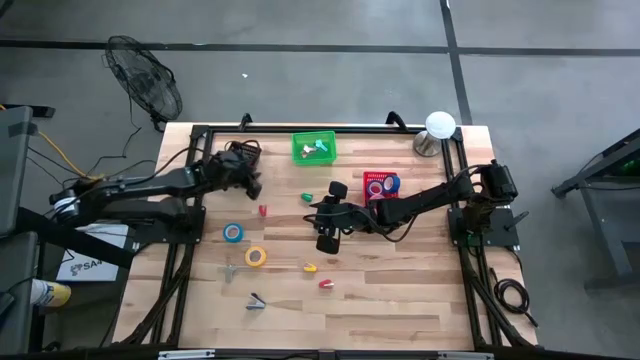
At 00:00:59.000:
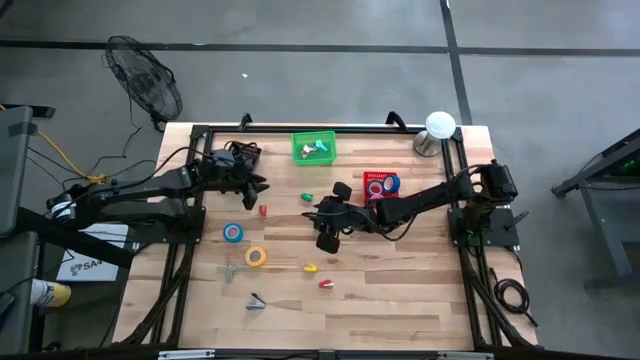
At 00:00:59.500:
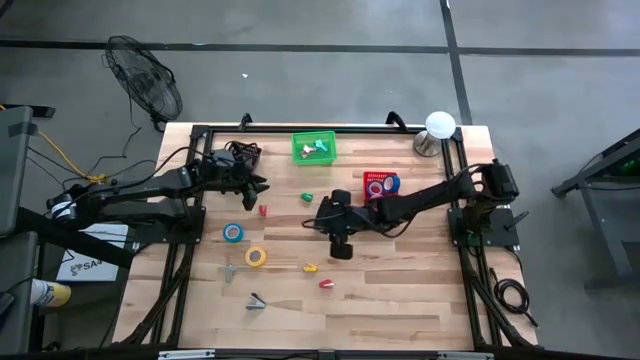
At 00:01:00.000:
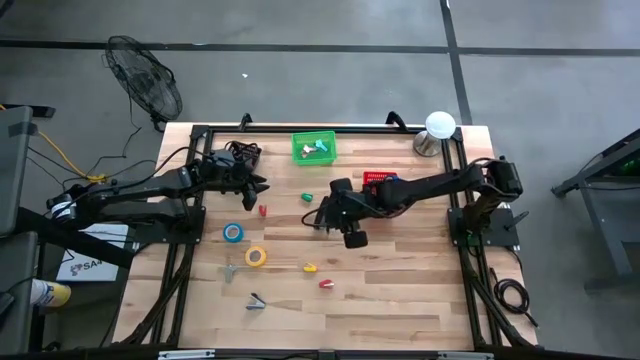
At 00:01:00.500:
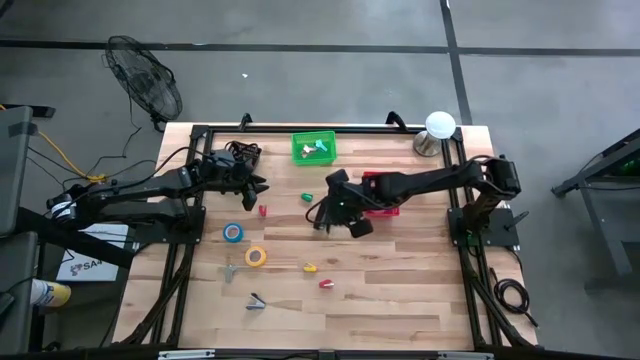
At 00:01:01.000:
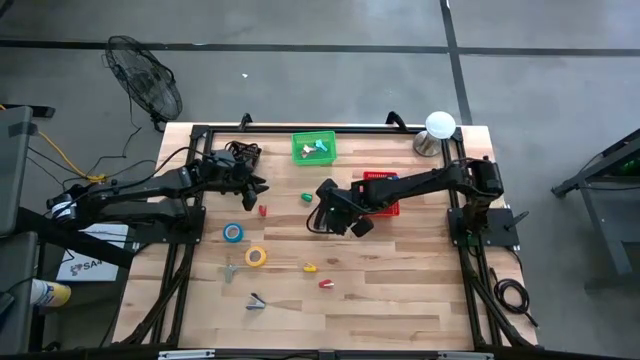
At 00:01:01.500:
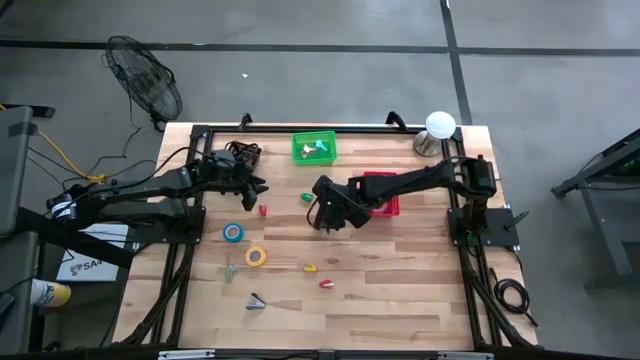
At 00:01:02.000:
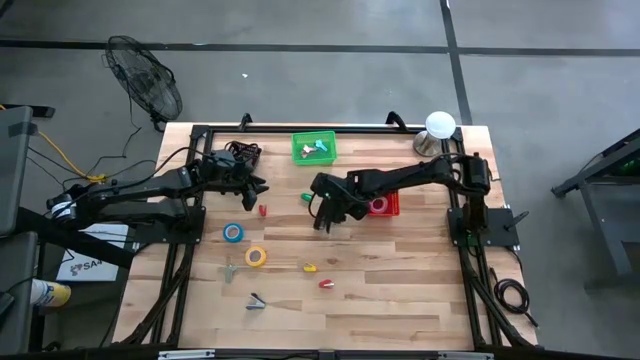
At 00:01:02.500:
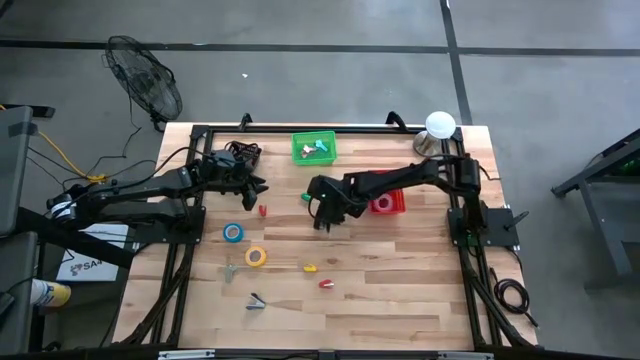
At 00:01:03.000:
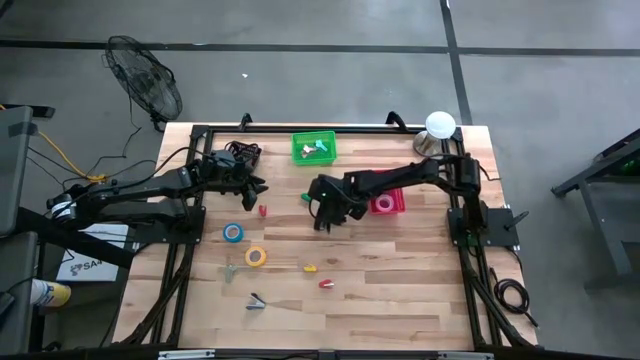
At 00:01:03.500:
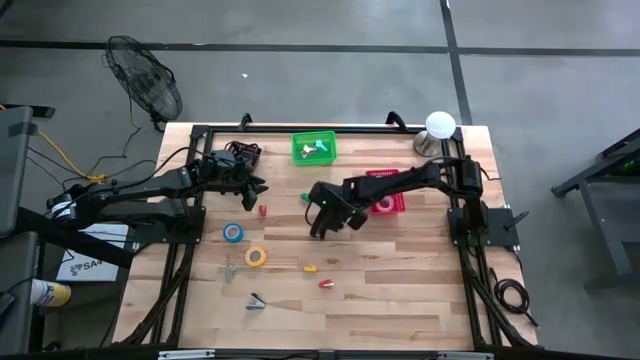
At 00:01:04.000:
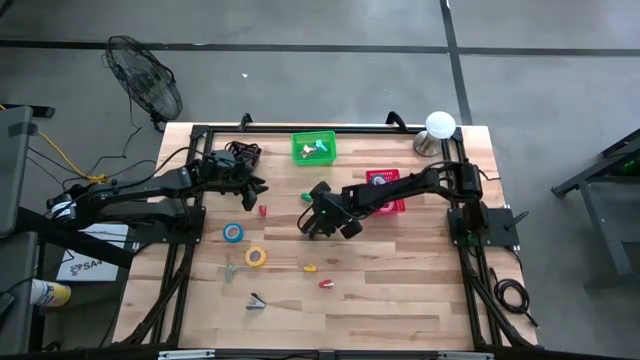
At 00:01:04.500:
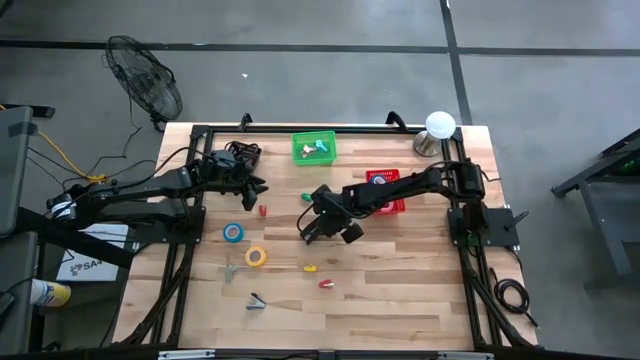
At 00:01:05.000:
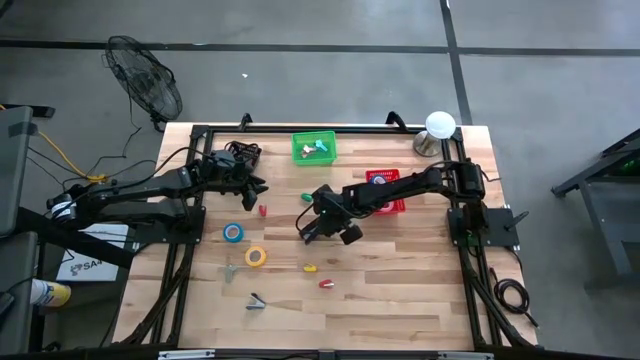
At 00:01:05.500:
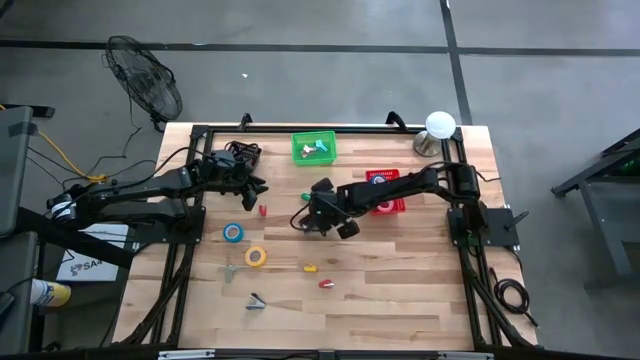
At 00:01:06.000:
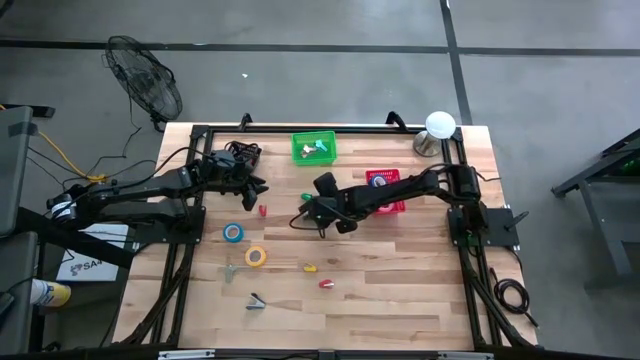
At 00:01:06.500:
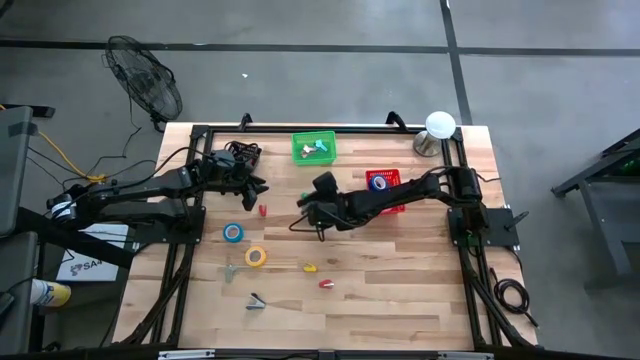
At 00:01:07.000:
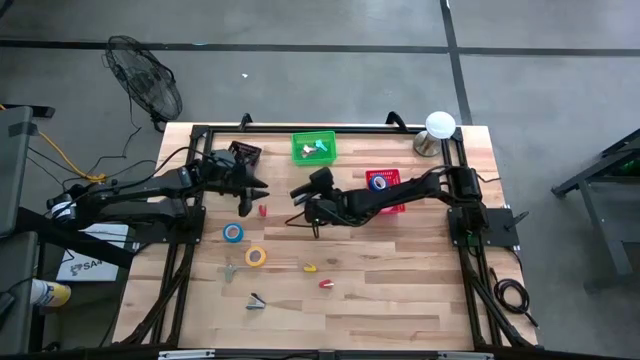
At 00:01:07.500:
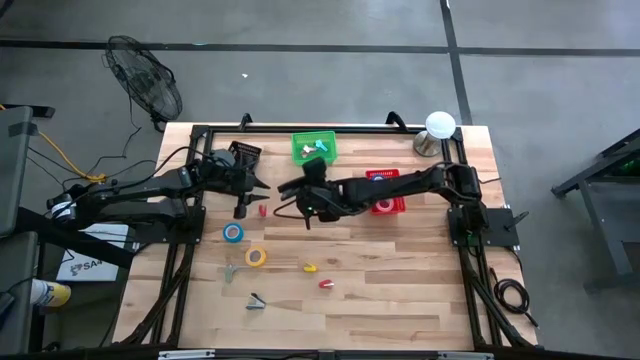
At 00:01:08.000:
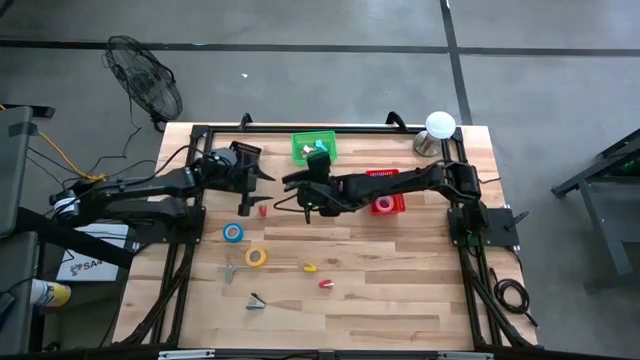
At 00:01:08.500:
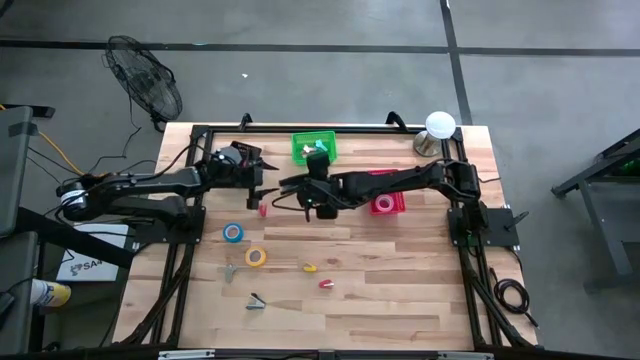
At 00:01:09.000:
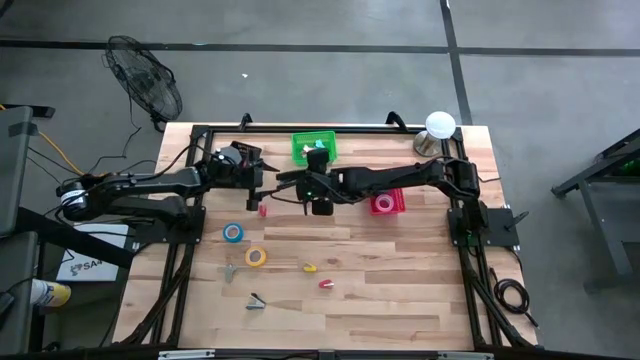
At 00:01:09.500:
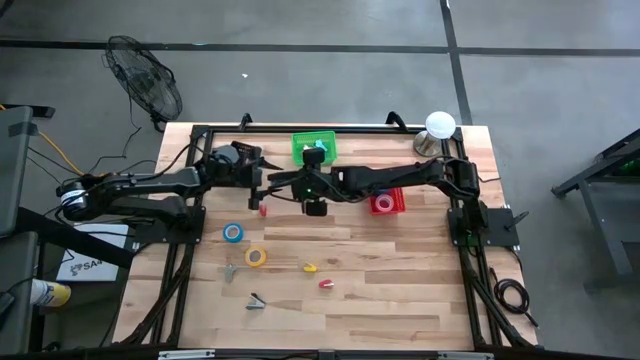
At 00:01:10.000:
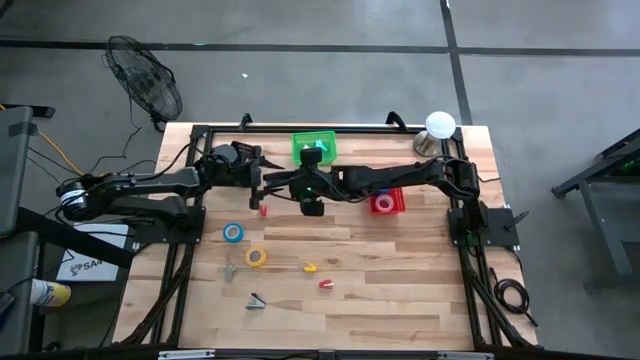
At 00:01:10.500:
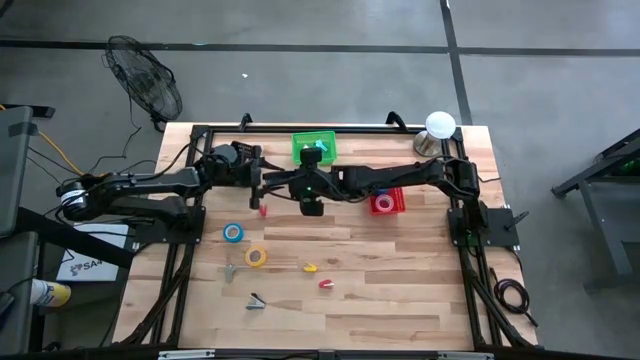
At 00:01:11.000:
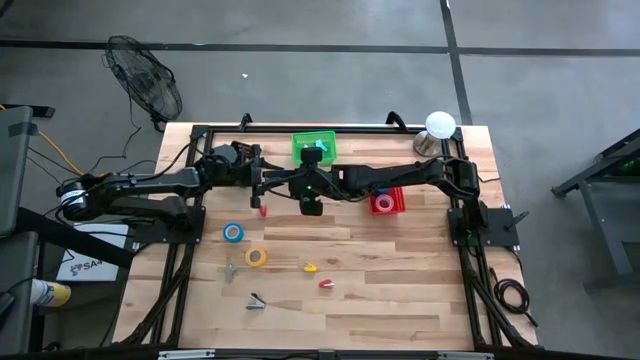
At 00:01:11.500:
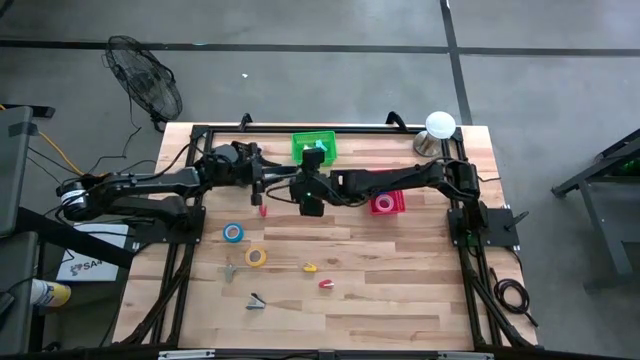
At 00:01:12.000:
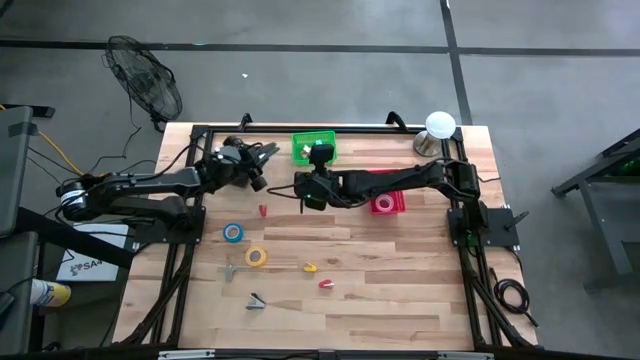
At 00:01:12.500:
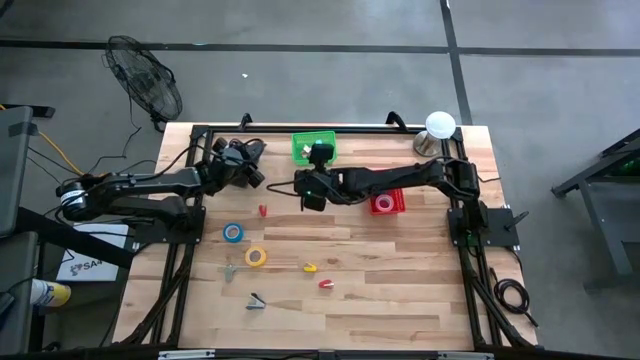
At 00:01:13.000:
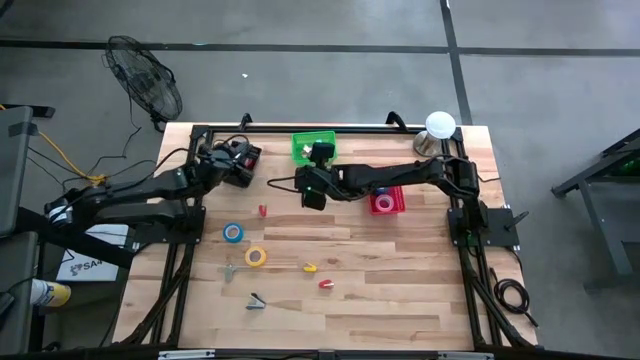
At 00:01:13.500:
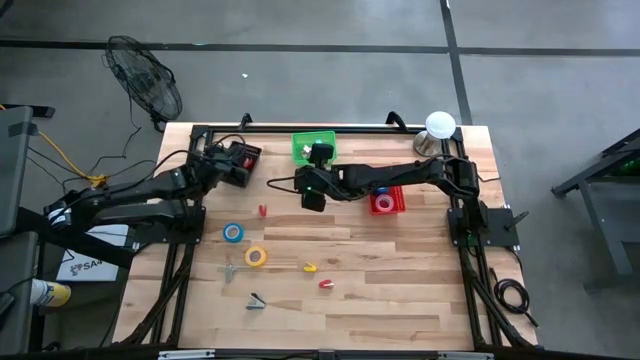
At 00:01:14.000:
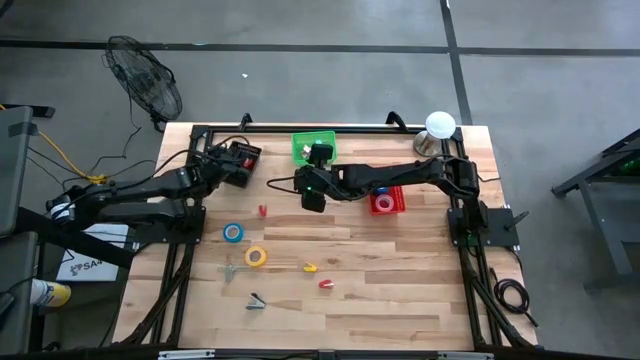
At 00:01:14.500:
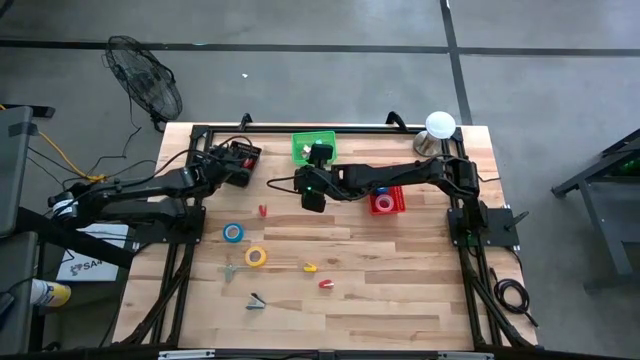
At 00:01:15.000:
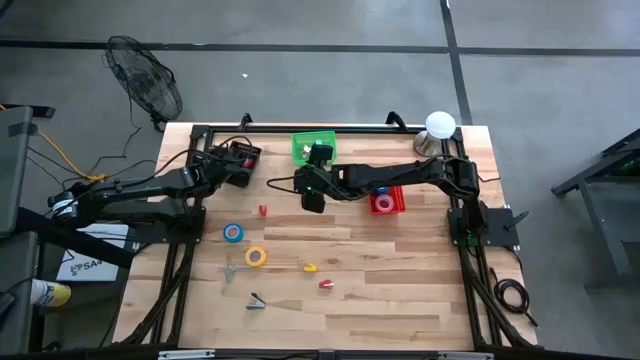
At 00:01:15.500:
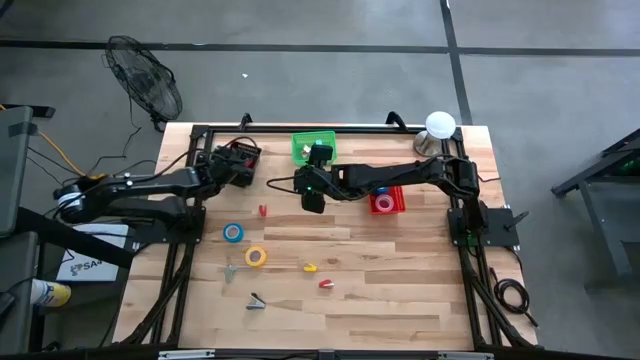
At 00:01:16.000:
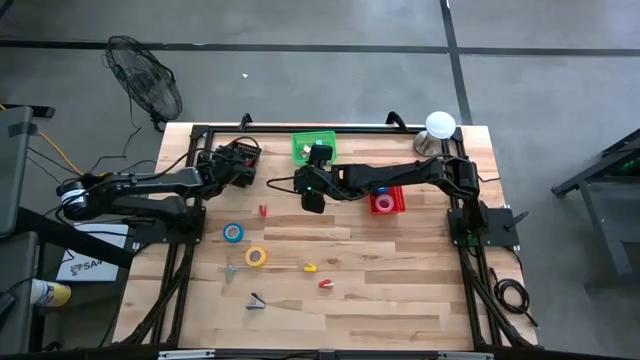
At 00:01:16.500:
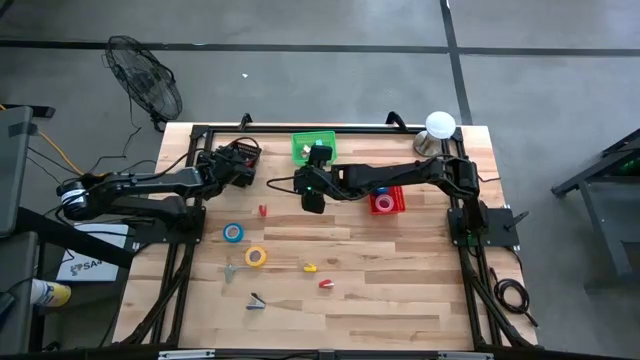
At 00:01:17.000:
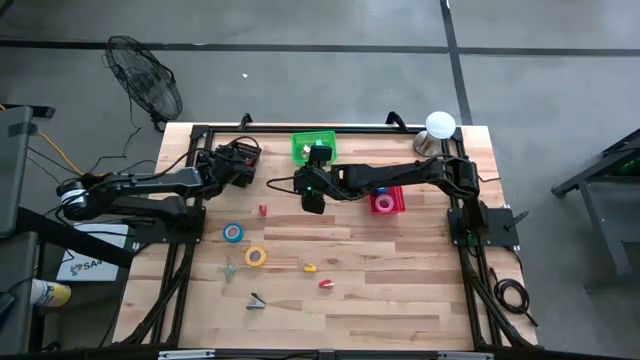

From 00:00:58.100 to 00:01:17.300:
Task: Pick and place Stapler, Stapler remover, tape
Put the black stapler into the black bin

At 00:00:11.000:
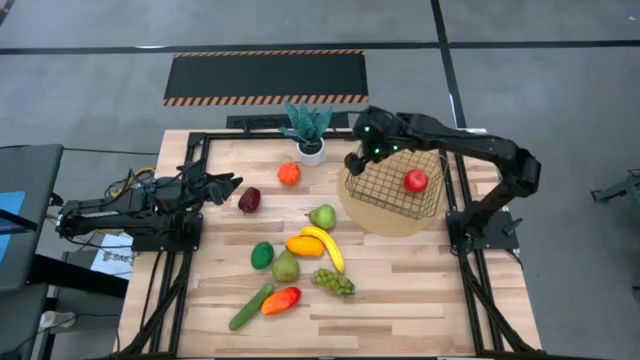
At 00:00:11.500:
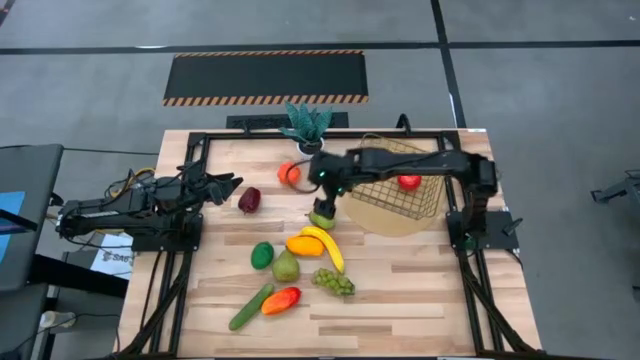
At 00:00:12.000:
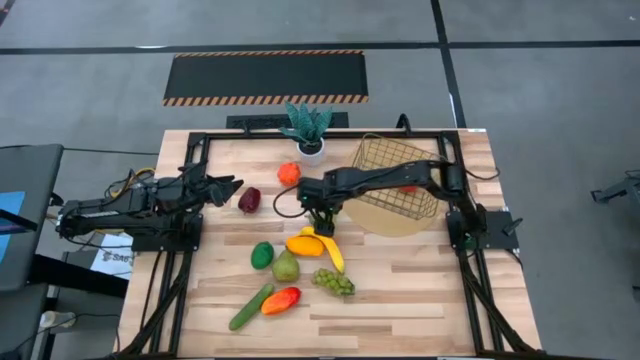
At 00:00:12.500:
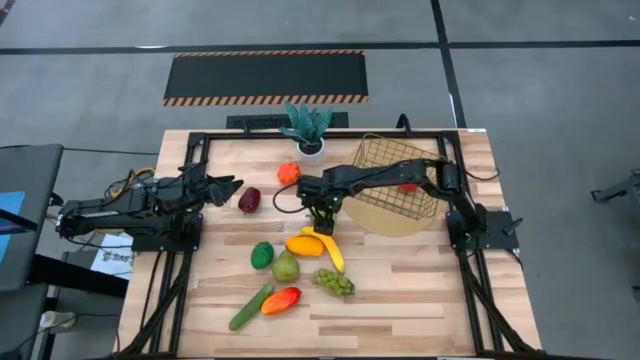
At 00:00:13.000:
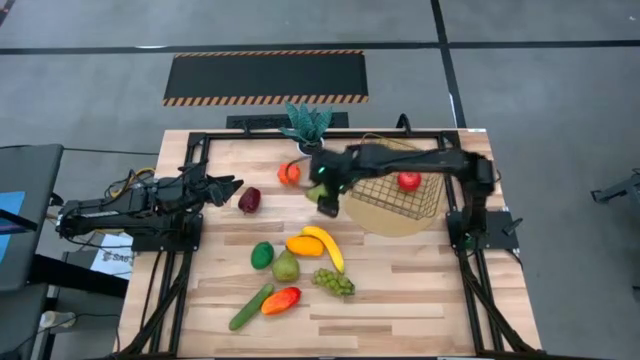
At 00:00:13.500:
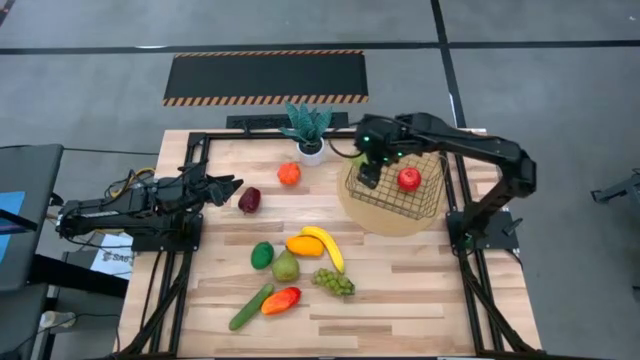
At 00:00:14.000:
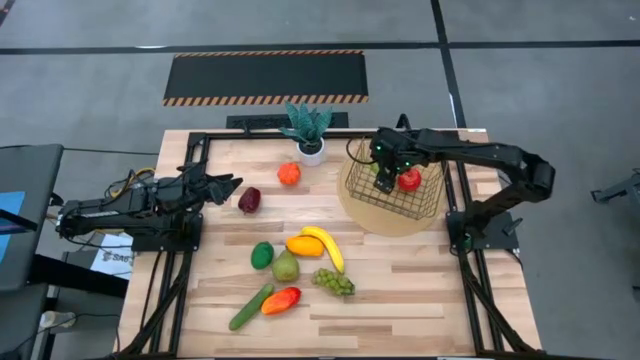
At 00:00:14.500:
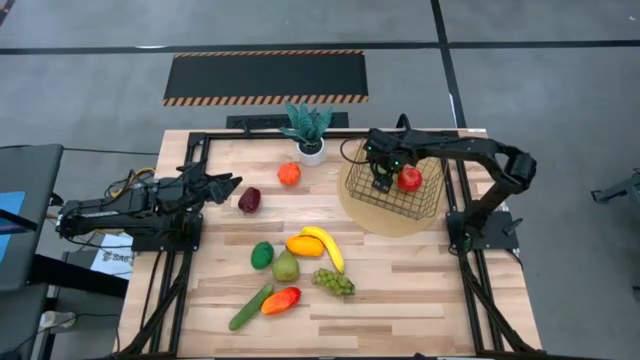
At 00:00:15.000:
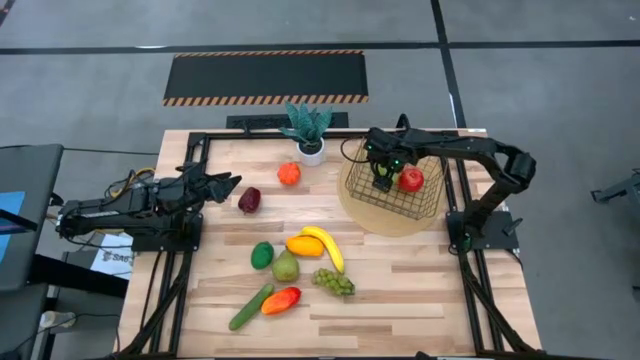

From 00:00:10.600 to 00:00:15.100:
Task: Build produce basket
Put the top green pear into the wire basket
